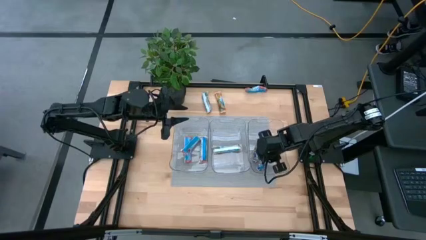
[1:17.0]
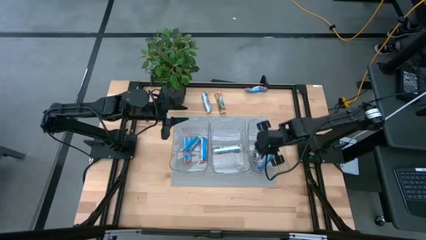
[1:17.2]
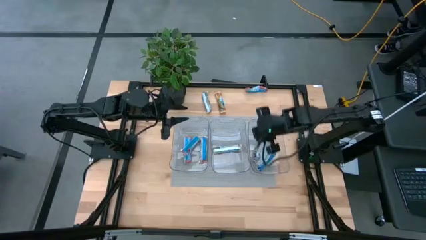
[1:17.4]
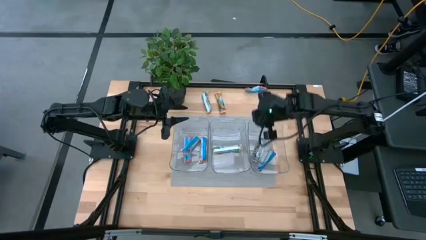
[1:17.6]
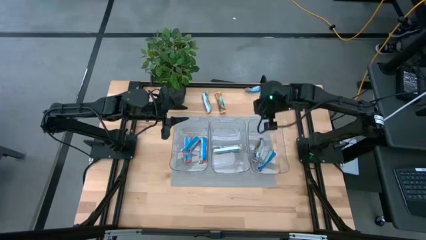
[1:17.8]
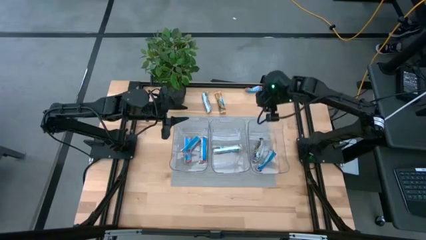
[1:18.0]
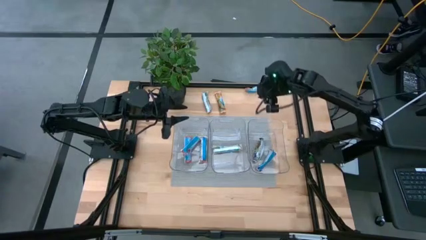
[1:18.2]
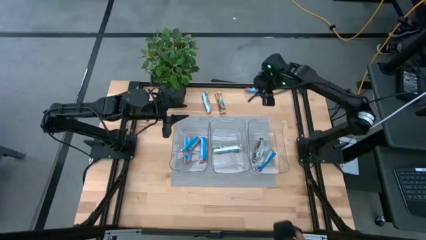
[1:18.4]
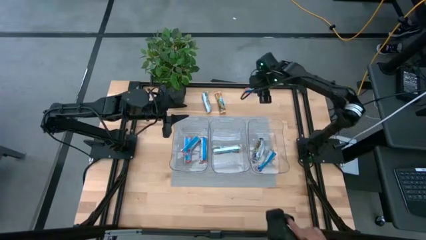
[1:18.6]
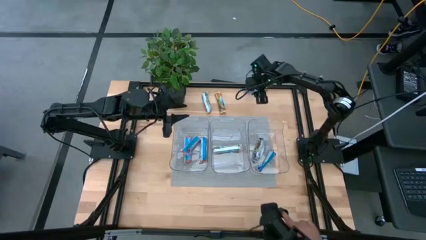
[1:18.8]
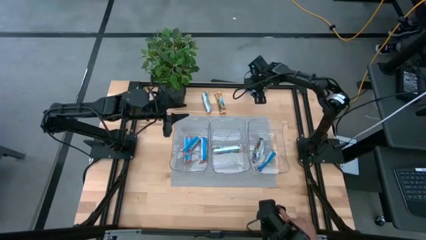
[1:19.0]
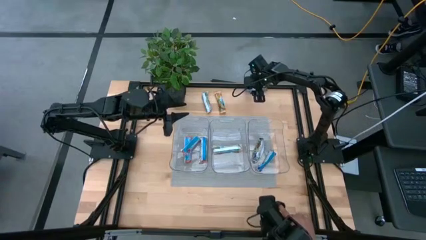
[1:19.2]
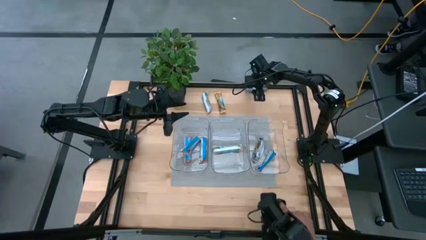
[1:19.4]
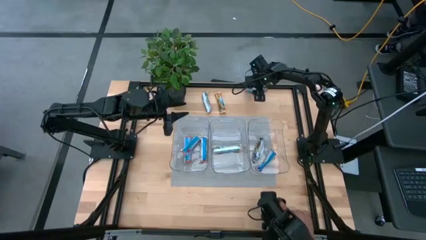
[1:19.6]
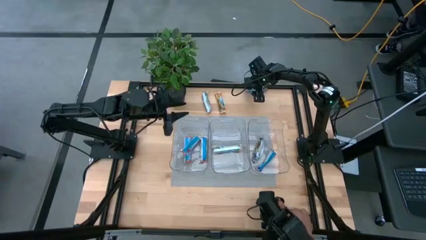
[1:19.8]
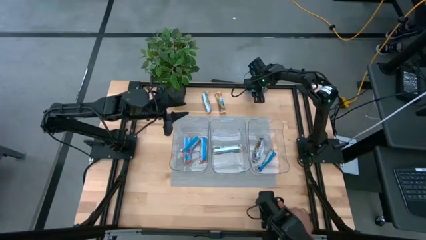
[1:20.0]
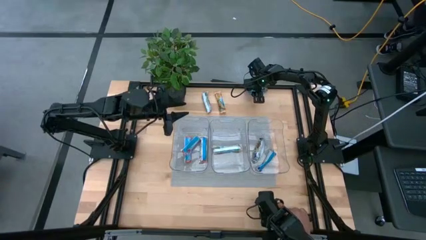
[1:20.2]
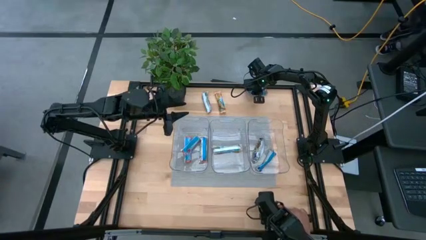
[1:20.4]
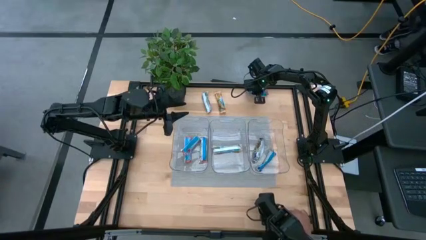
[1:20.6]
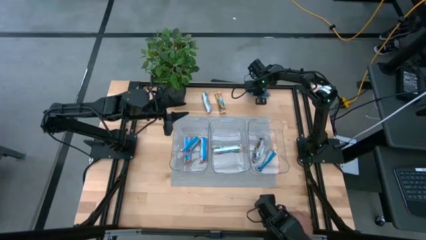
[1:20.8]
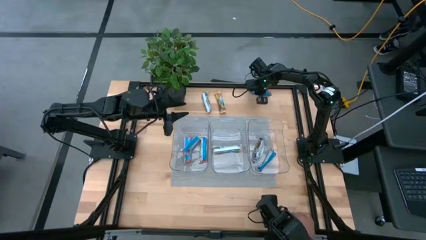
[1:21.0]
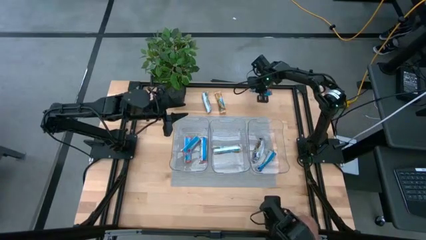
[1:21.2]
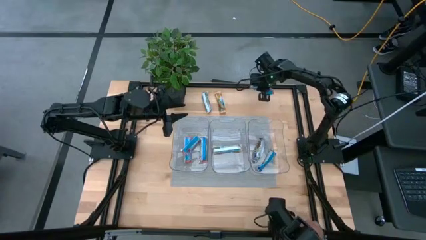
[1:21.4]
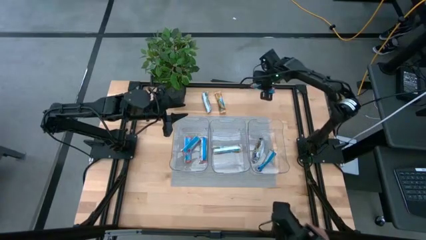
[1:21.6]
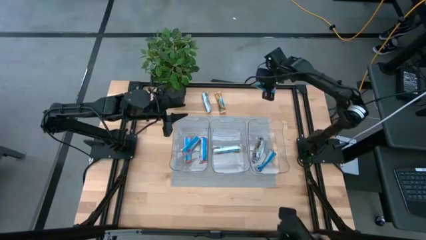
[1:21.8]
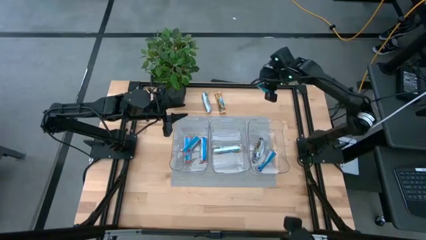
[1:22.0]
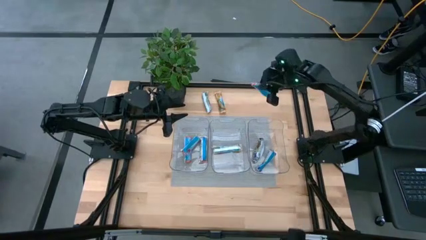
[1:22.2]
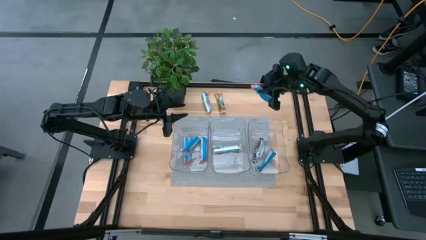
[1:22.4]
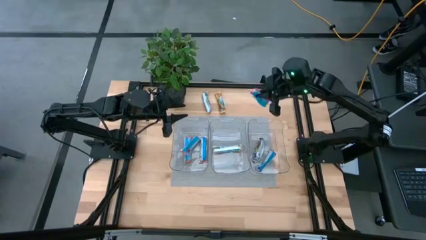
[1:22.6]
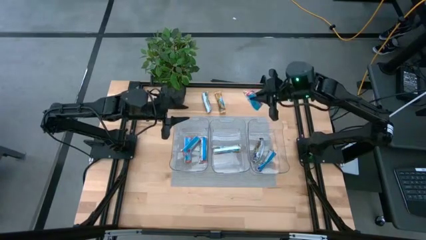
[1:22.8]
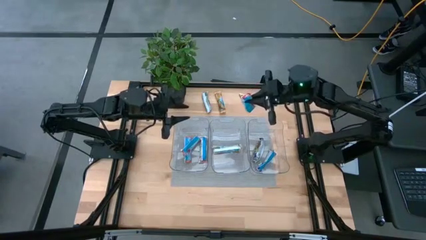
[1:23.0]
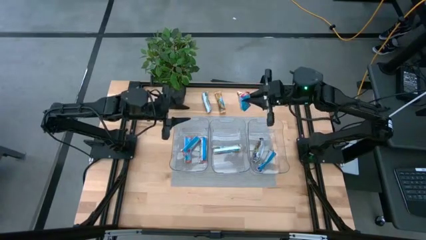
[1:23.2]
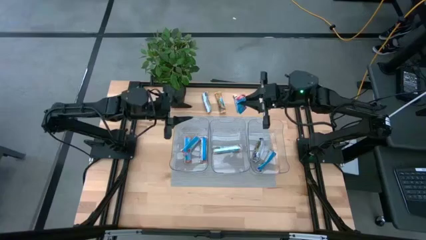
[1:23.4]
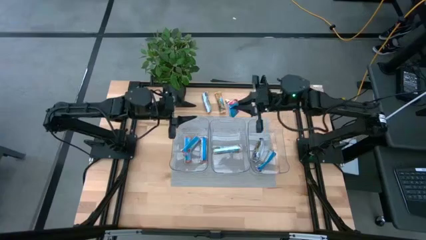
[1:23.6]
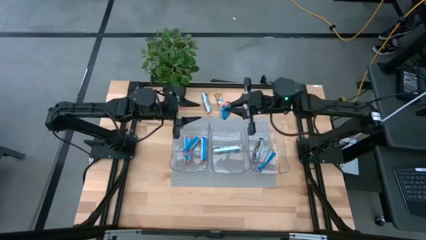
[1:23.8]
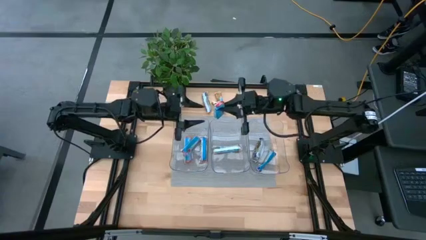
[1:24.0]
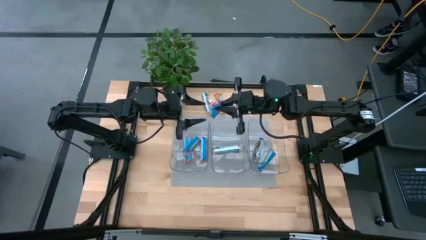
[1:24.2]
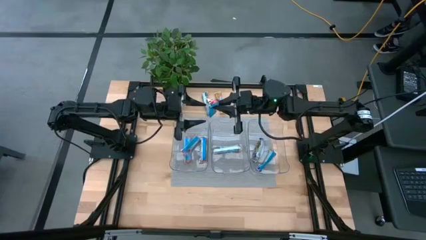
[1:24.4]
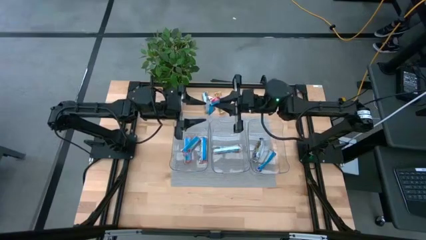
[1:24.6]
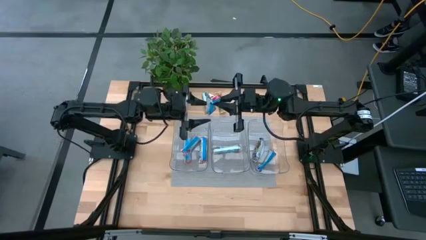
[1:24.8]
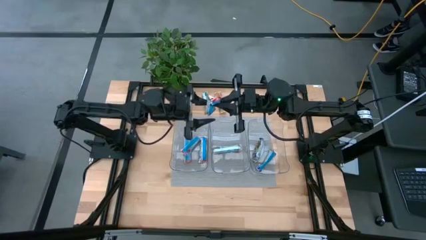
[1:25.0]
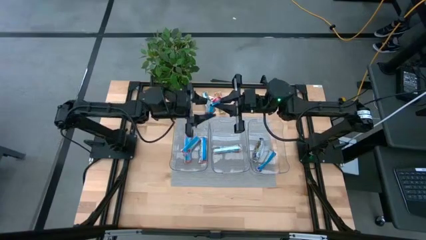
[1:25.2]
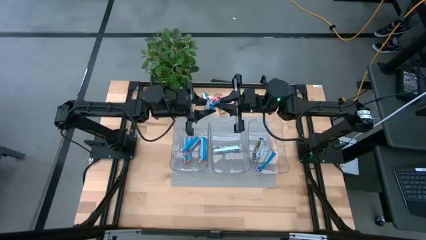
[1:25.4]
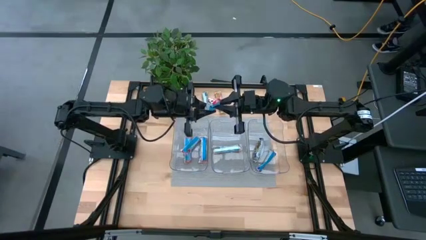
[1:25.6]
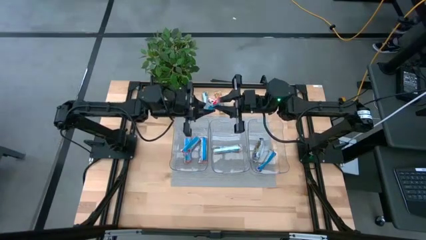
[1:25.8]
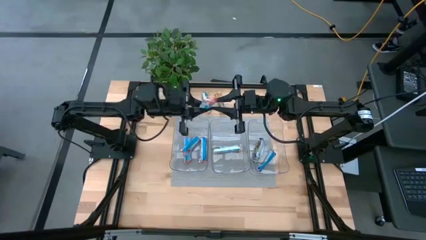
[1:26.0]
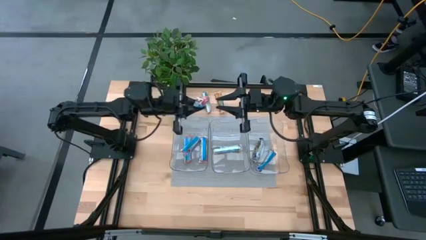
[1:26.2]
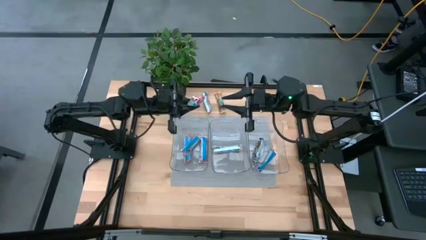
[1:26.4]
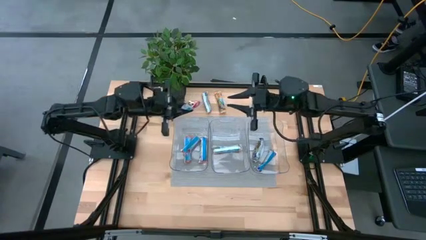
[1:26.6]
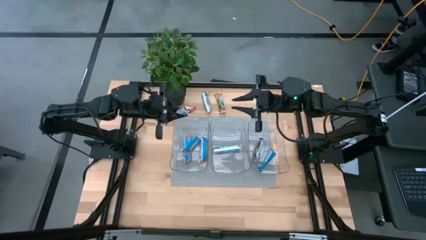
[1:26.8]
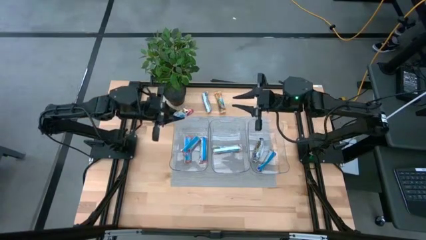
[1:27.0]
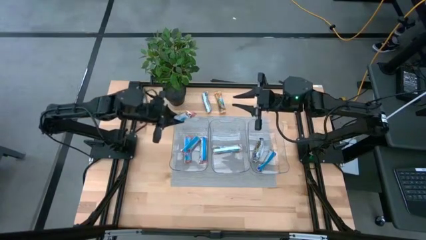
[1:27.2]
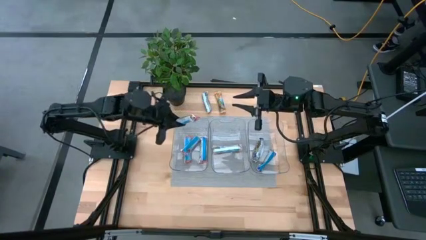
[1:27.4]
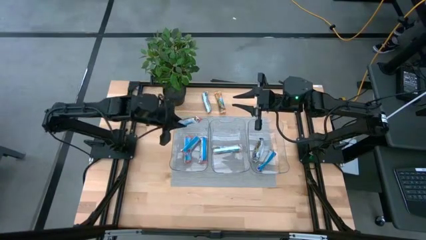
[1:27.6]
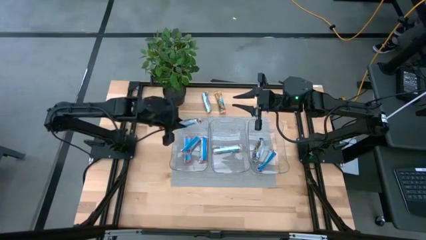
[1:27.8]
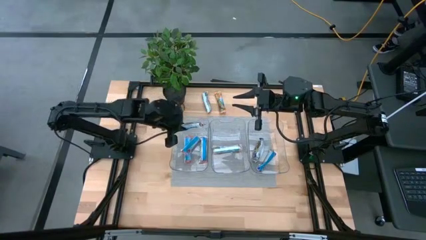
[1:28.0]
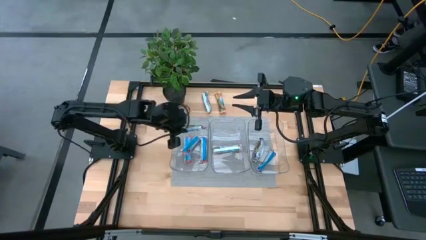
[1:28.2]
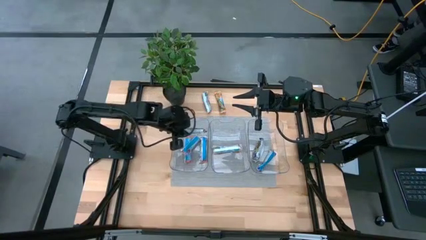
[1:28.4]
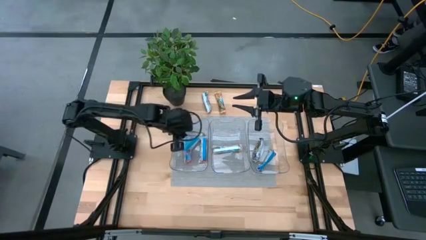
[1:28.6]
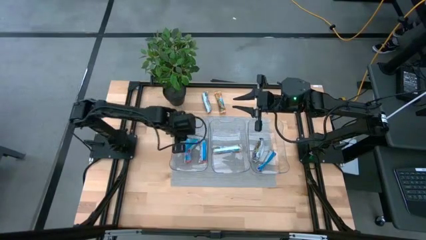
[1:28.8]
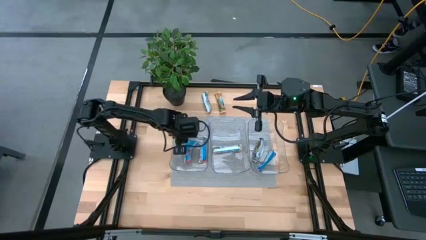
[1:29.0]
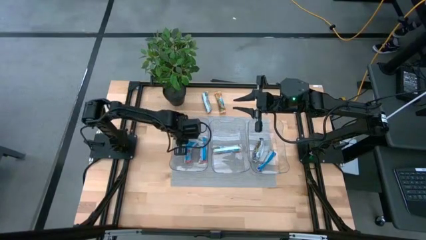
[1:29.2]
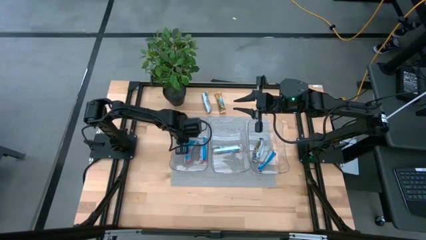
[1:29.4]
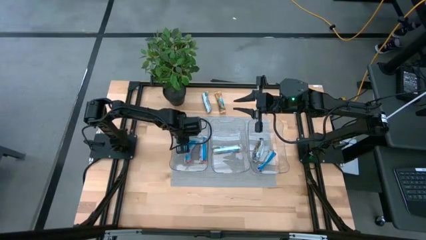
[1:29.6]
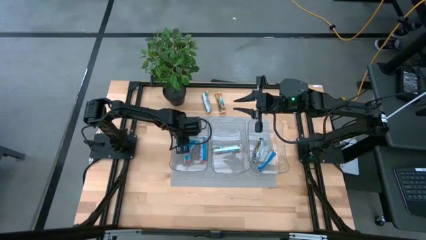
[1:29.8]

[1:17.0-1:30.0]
Task: Pick and place Granola Bars by type
Put the red granola bar into the left transparent bin

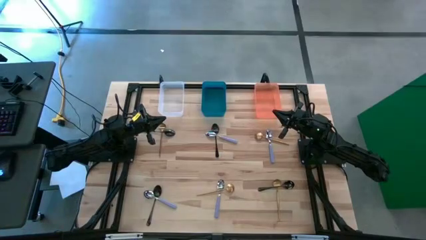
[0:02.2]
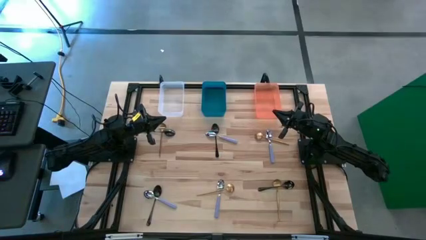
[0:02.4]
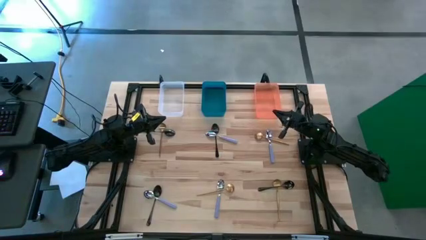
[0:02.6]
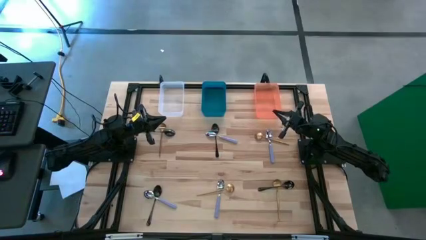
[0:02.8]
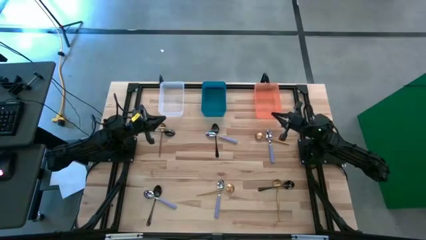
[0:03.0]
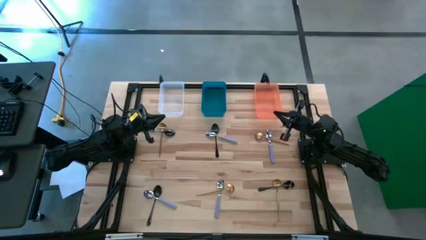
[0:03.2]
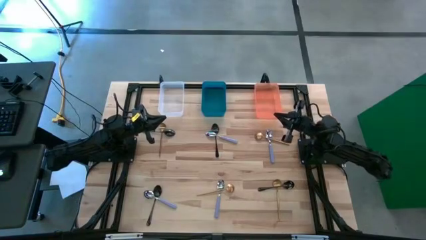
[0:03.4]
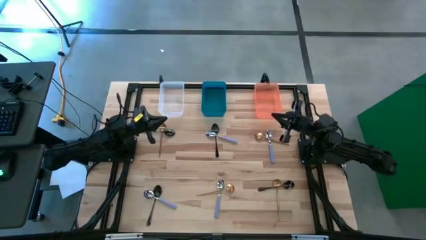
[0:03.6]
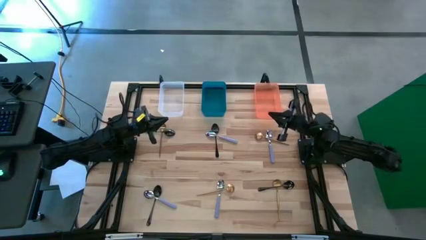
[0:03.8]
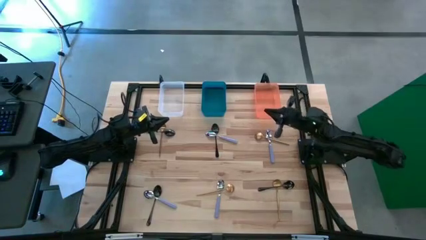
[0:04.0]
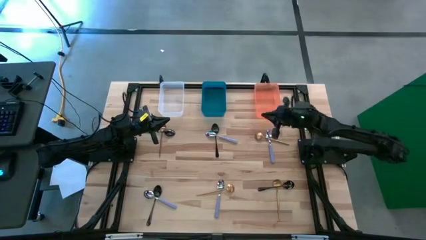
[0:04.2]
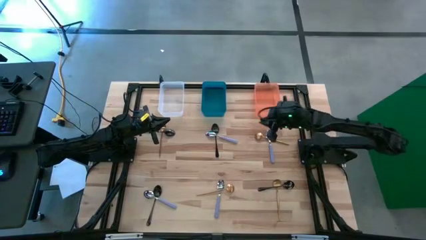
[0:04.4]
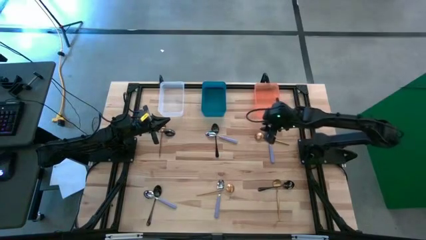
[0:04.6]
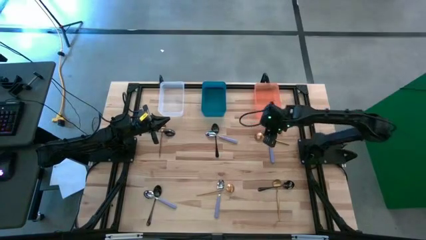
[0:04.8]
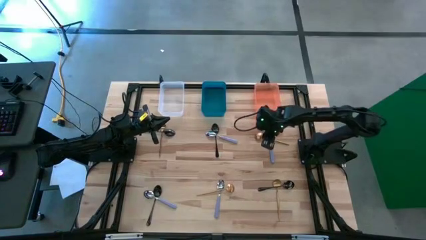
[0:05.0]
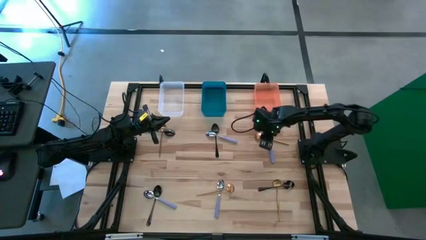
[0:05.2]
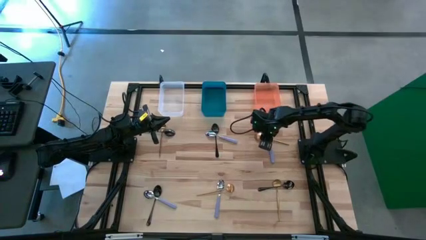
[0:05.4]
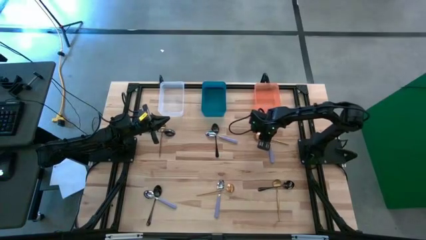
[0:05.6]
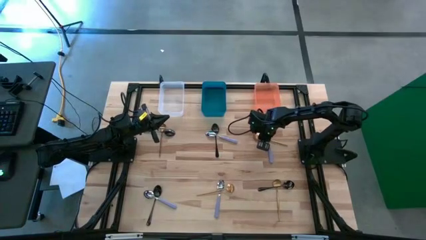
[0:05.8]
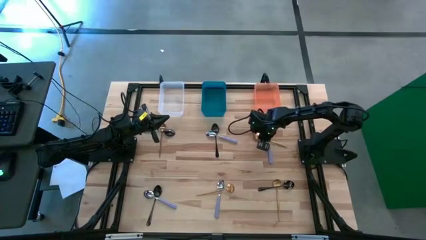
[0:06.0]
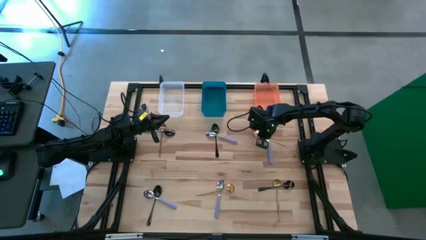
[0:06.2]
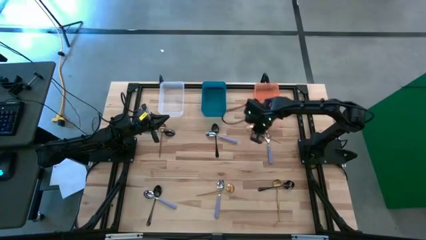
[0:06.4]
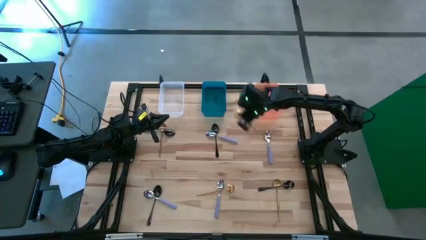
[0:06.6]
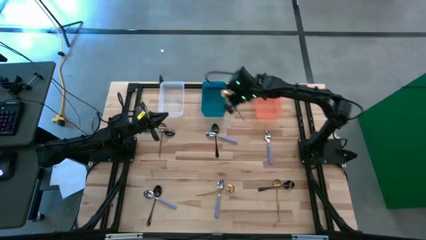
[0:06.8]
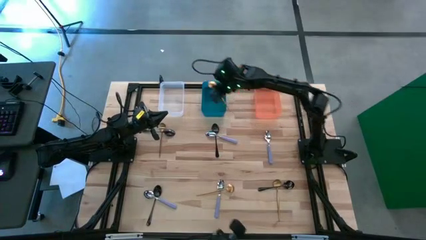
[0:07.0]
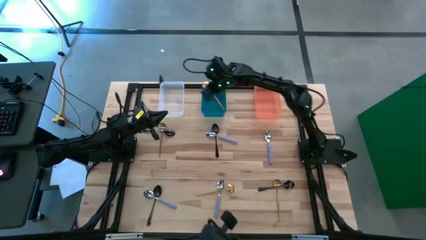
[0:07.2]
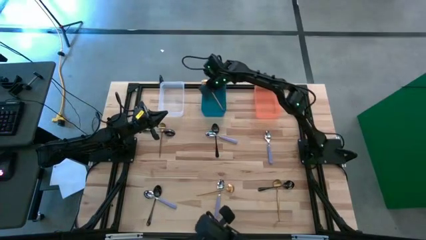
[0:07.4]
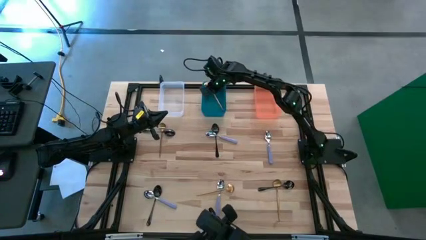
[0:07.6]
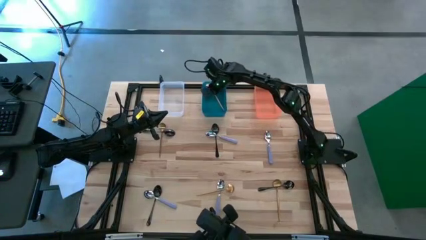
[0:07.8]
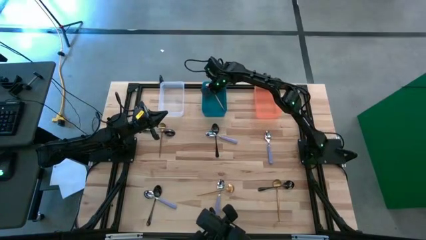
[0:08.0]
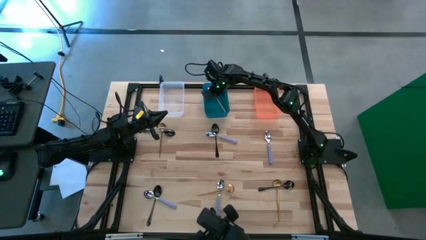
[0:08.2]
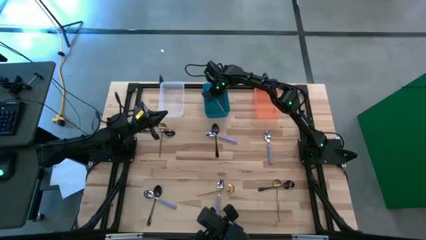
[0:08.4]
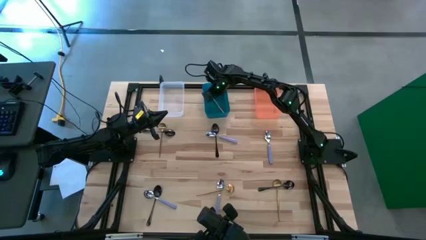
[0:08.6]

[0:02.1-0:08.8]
Task: Sort silverware by color (type)
Put the top right gold spoon into the blue bin
